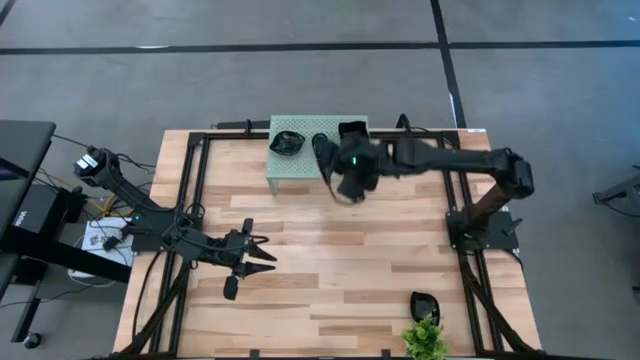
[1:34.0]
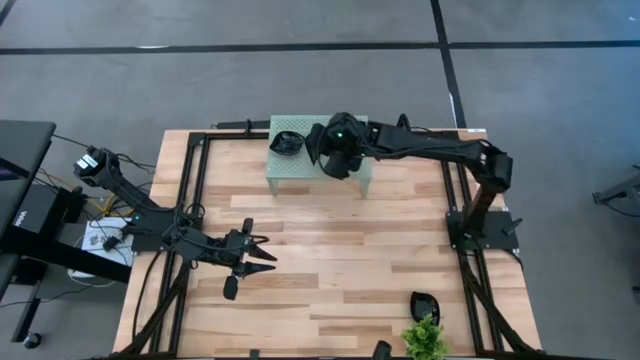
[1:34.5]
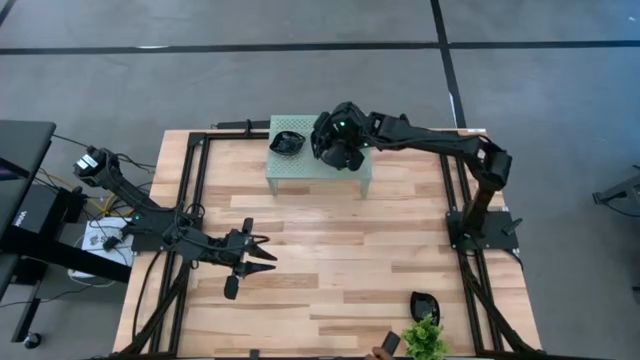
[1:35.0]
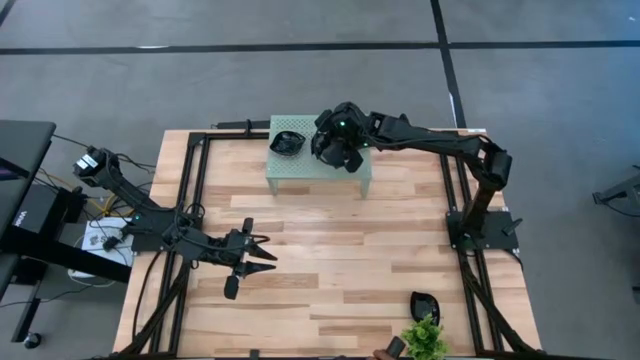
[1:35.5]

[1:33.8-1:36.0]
Task: Pick & Place Mini shaped plates
Stack the drop-shaped plate on top of the other drop-shaped plates on the shelf

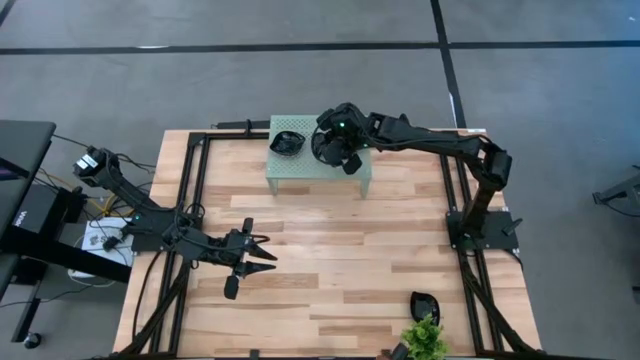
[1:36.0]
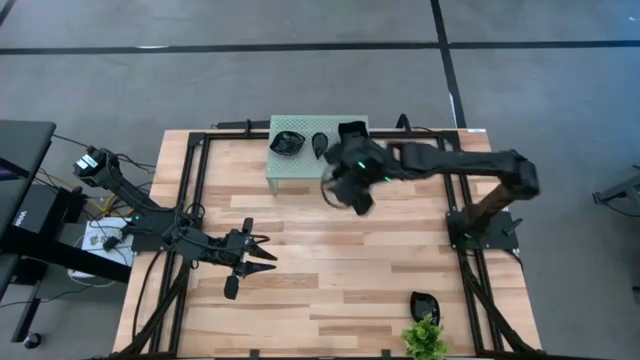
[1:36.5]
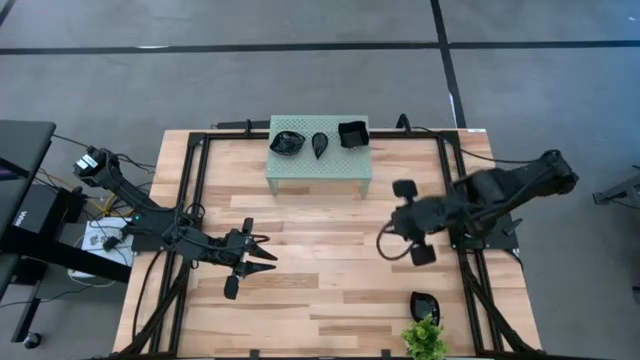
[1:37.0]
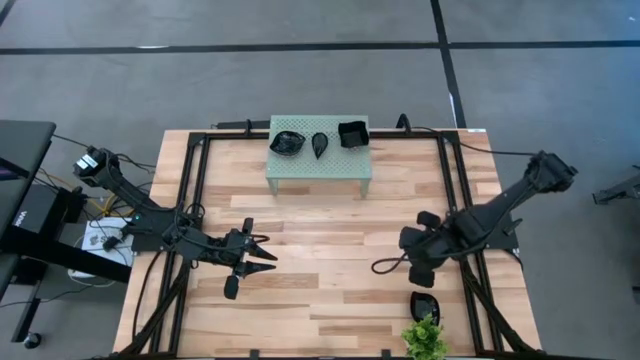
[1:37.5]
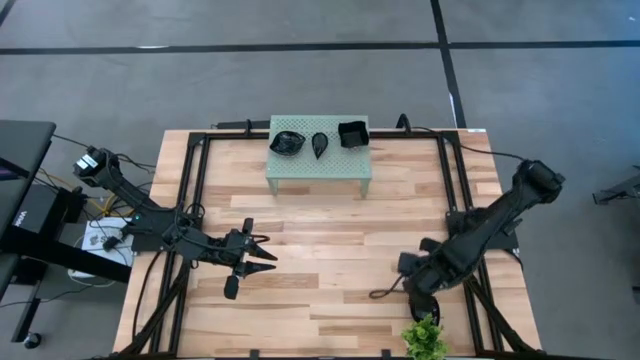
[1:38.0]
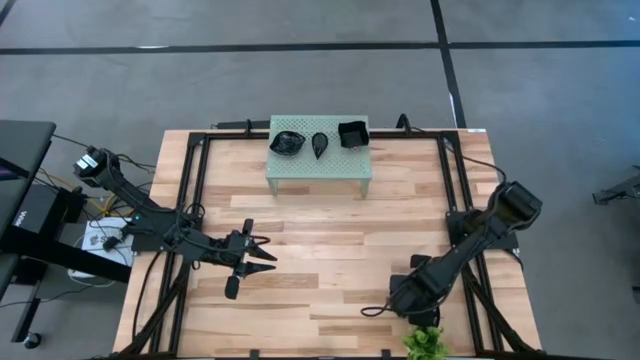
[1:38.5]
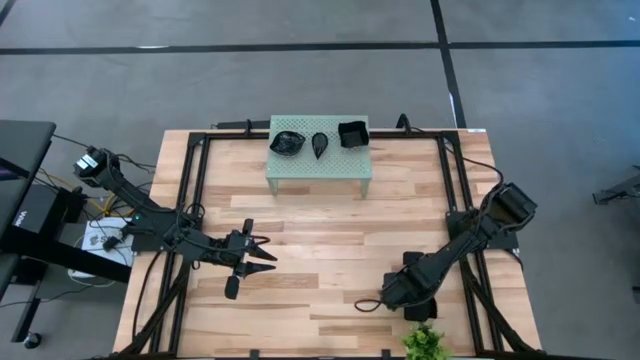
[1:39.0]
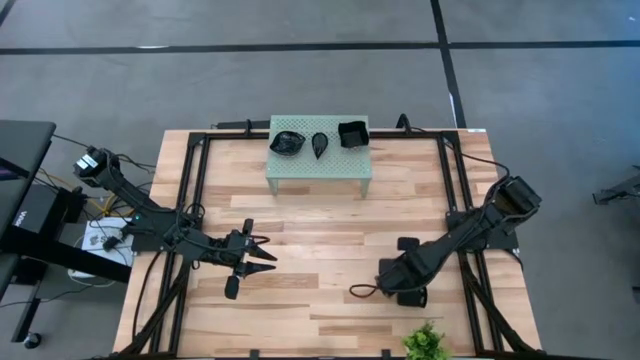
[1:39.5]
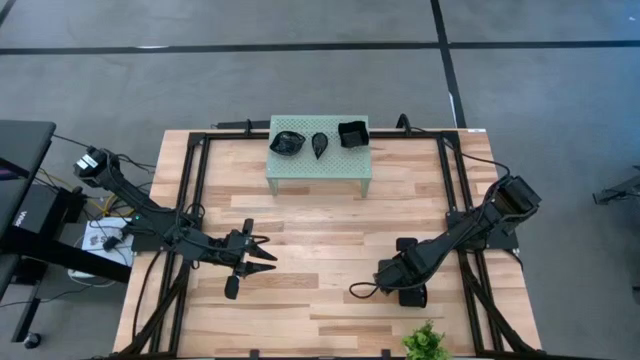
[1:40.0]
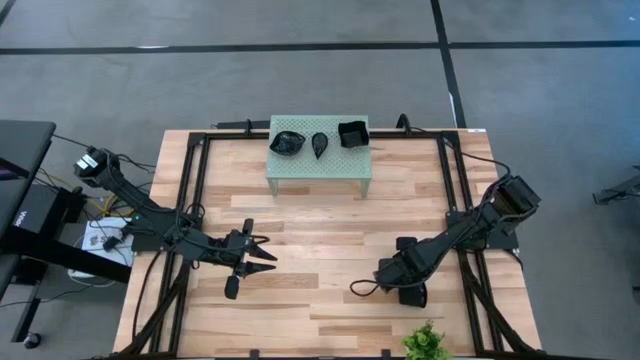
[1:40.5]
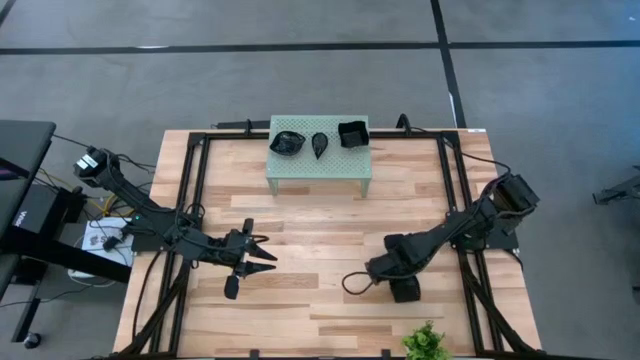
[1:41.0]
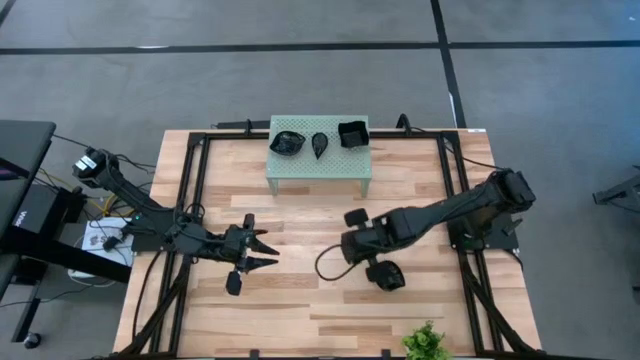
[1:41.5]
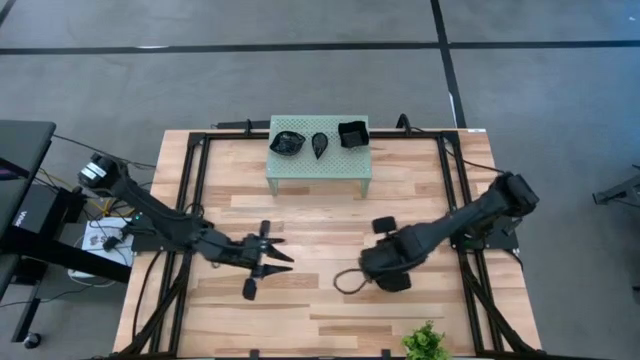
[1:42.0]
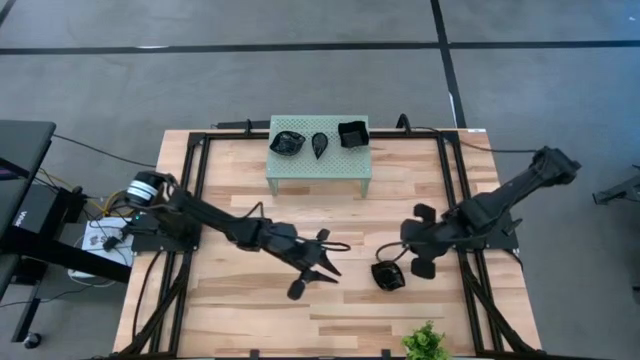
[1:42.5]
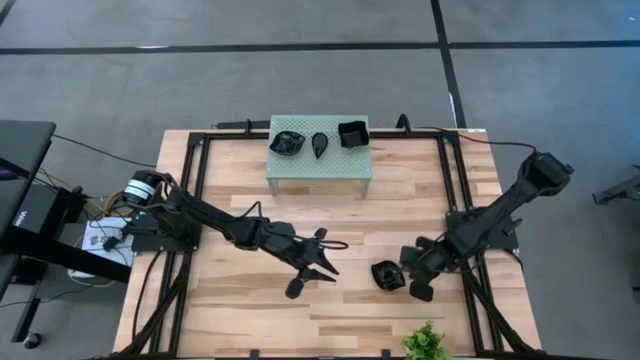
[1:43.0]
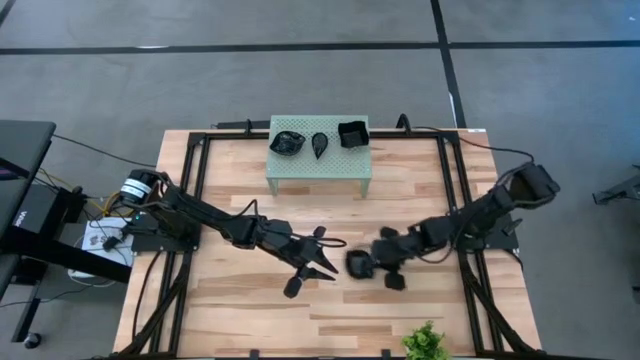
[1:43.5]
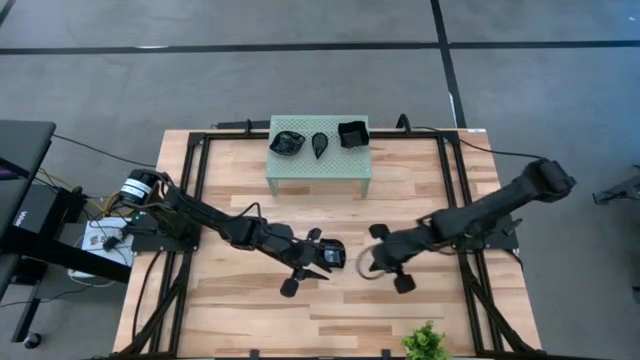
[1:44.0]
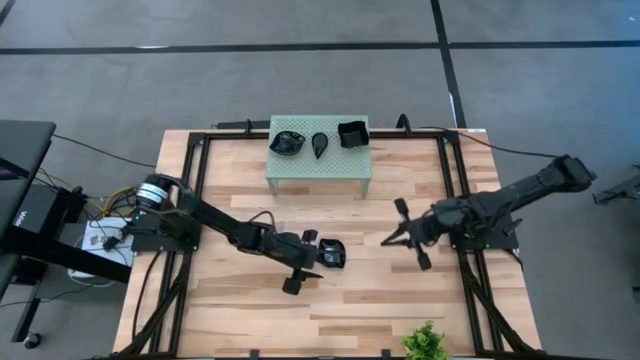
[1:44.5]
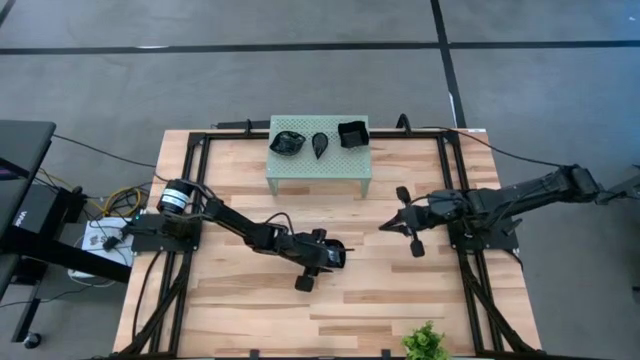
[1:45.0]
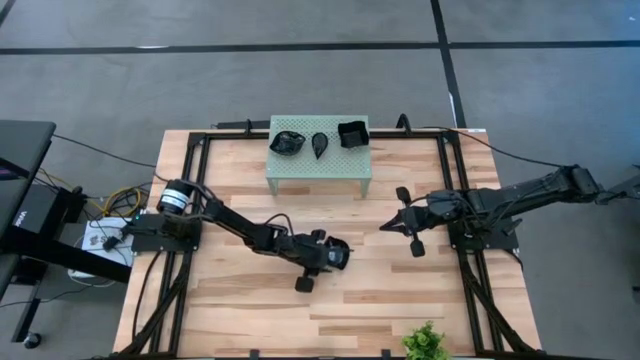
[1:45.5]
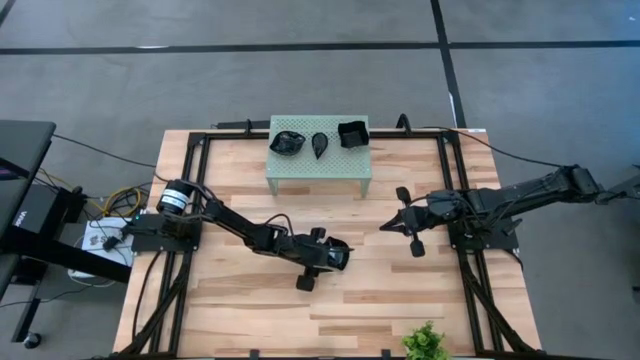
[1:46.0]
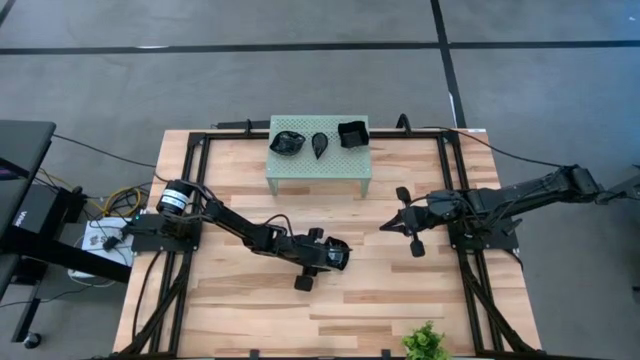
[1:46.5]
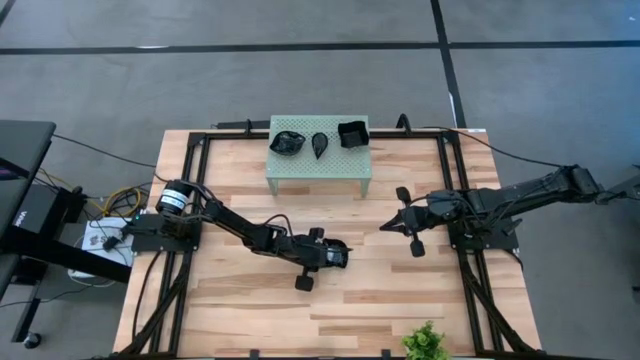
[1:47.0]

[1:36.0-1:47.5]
Stack the bottom right leaf-shaped plate on top of the other leaf-shaped plate

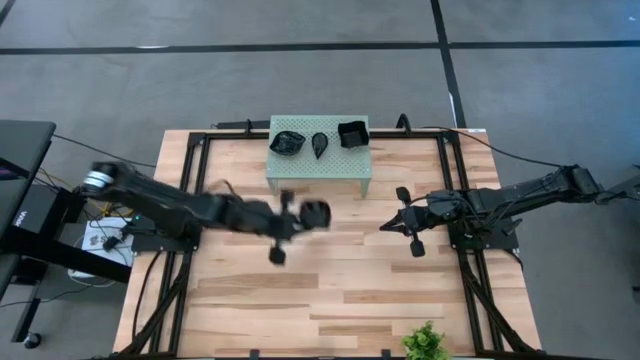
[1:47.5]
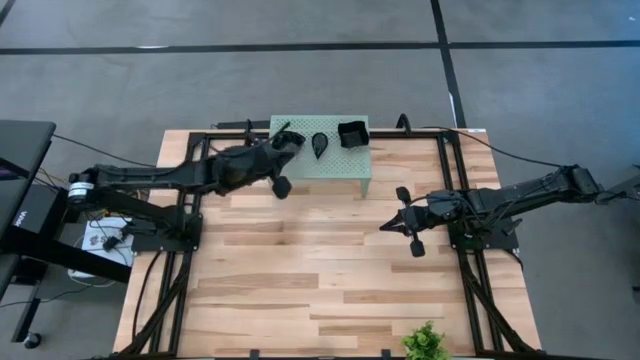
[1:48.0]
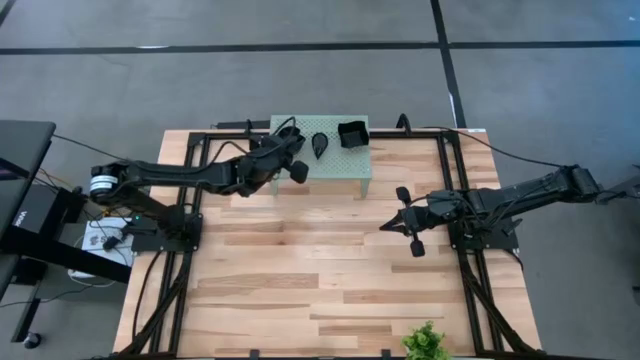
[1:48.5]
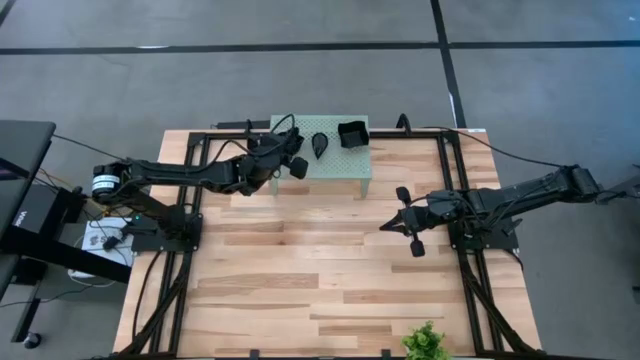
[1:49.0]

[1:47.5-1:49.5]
Stack the leaf-shaped plate on top of the other leaf-shaped plates on the shelf
